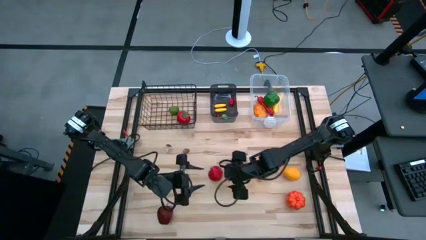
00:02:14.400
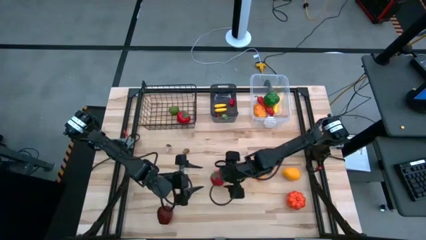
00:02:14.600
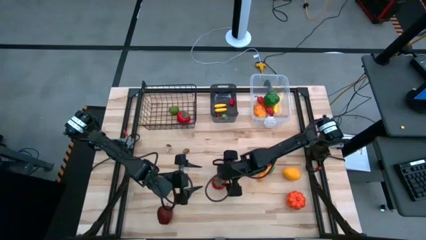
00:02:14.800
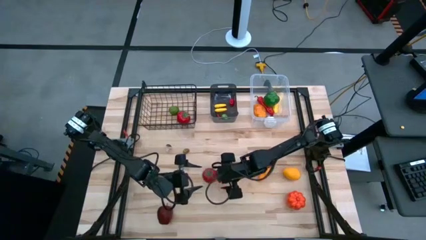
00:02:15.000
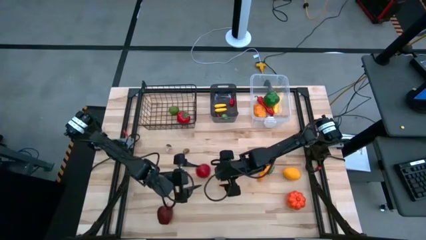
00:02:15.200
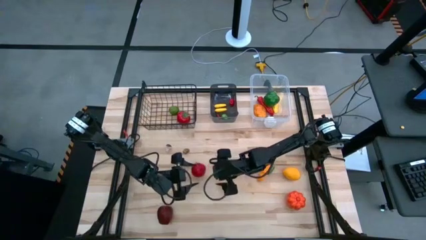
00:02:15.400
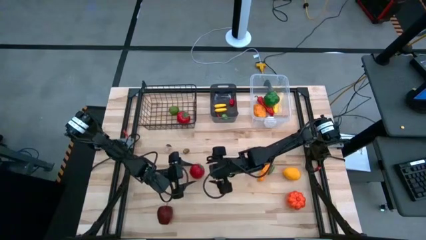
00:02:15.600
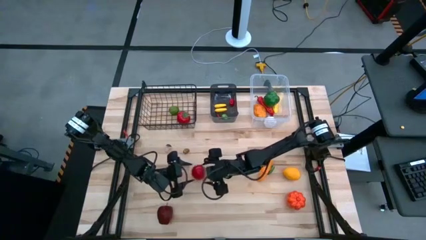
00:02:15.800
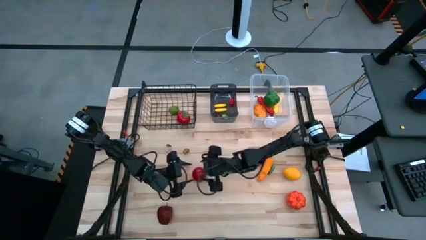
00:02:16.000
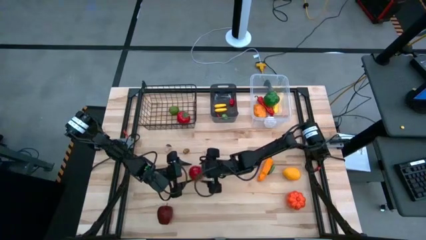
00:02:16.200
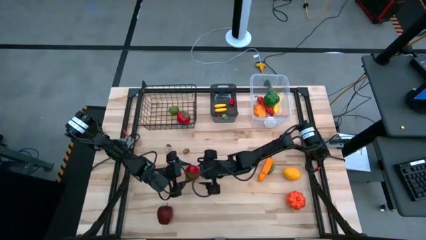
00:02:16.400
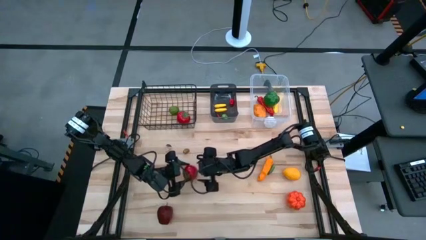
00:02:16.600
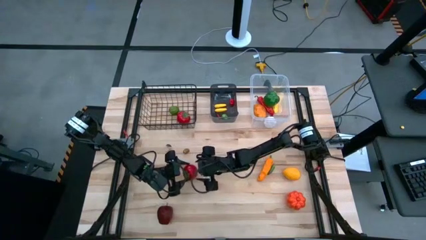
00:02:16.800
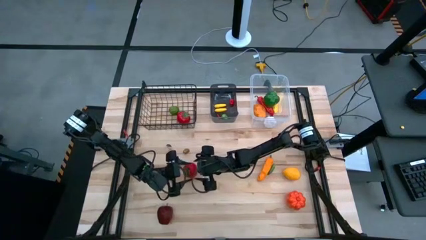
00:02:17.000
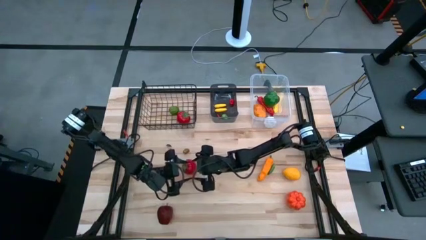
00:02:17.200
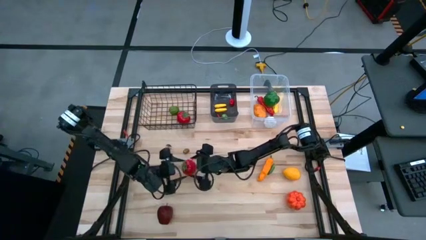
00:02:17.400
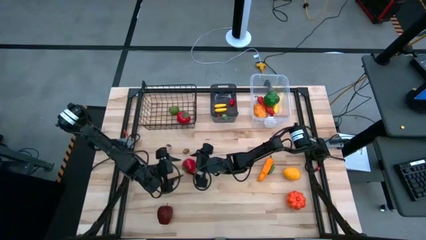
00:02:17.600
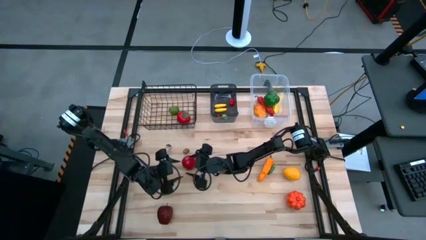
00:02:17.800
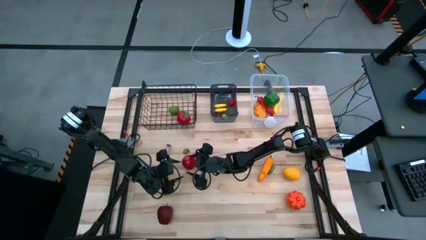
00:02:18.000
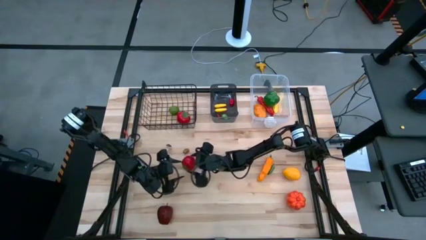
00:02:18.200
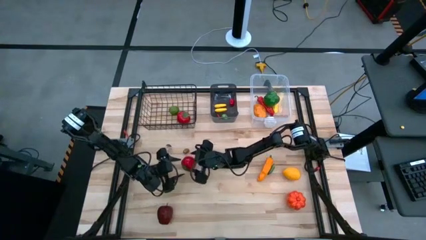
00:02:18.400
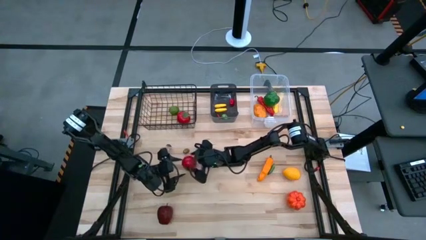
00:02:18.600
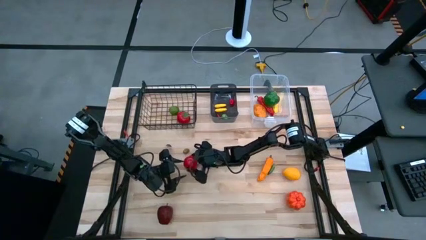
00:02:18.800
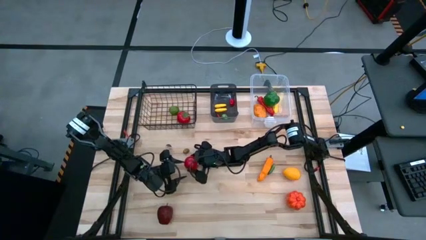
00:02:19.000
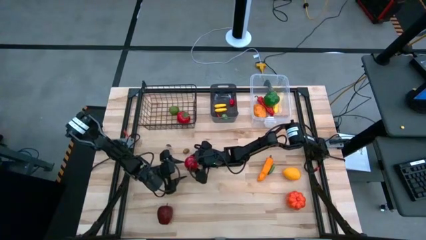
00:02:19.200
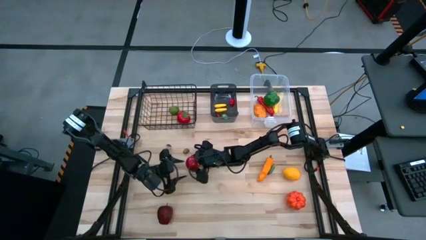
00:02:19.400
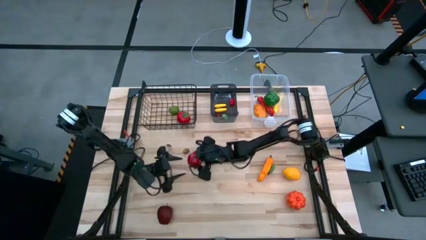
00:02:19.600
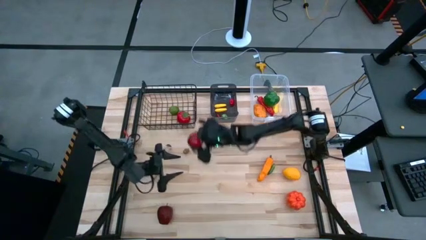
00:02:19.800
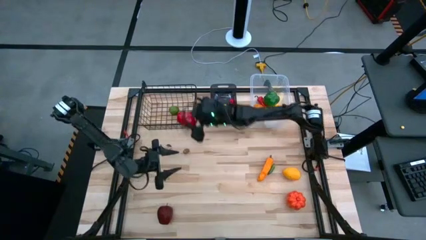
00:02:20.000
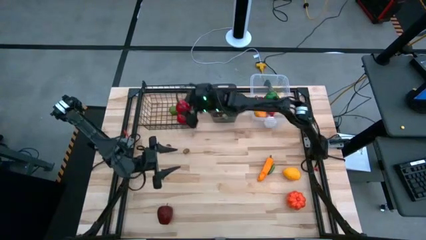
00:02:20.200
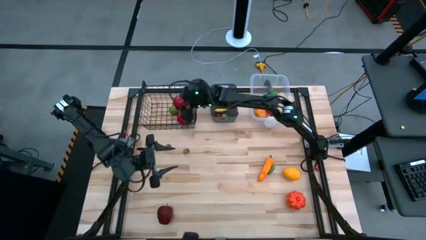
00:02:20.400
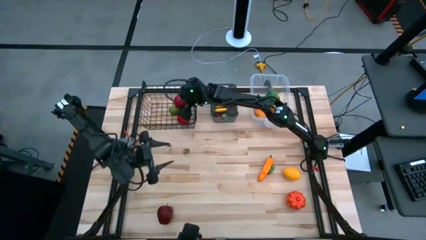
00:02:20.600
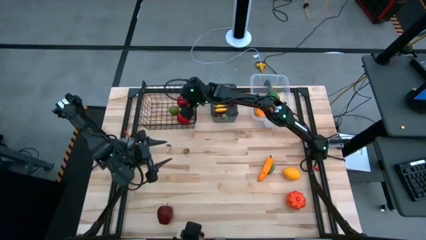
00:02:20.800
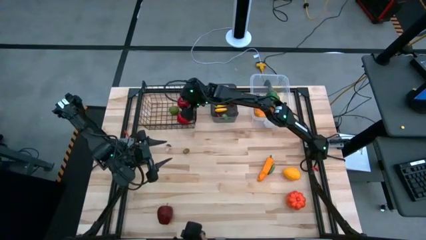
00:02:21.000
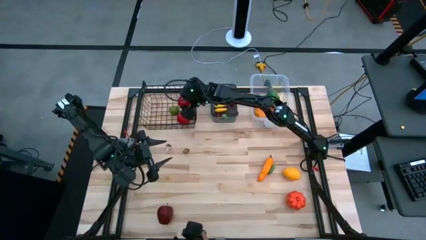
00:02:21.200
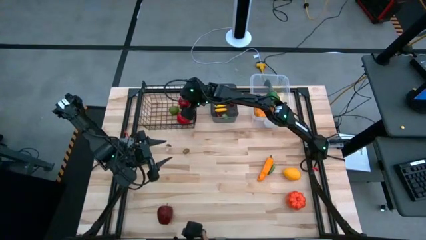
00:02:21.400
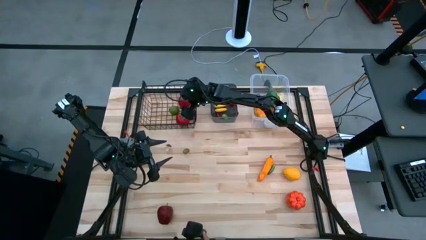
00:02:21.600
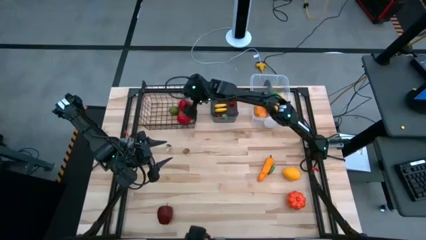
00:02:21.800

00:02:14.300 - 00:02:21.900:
Task: Sort produce into baskets
Put the tomato into the black basket

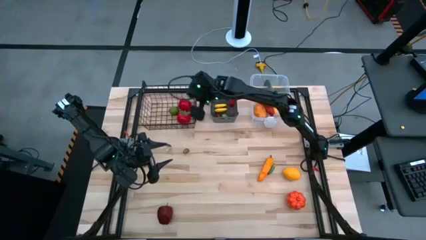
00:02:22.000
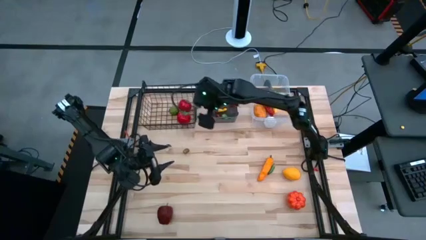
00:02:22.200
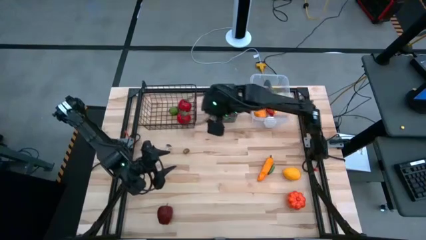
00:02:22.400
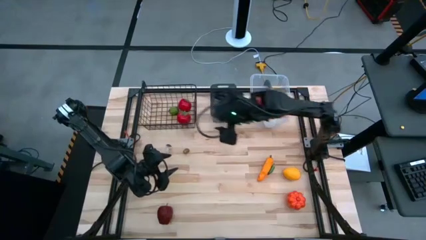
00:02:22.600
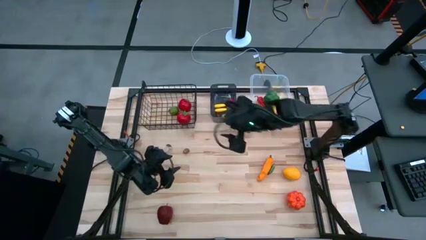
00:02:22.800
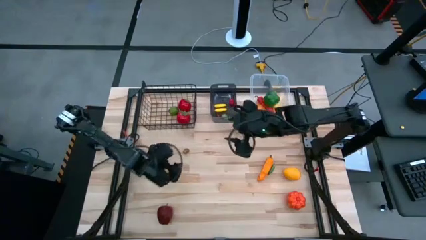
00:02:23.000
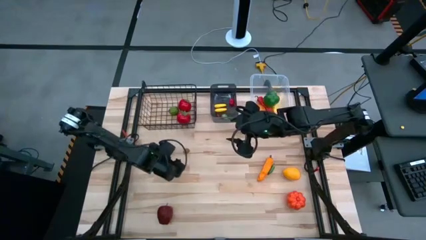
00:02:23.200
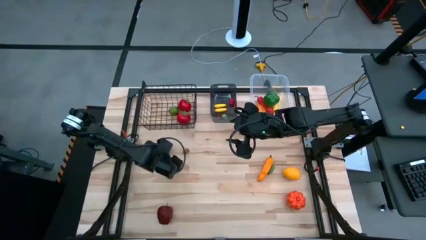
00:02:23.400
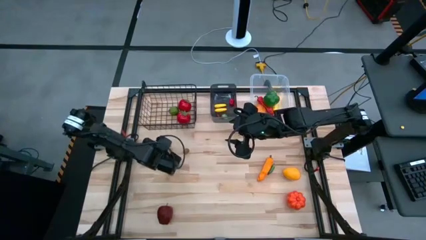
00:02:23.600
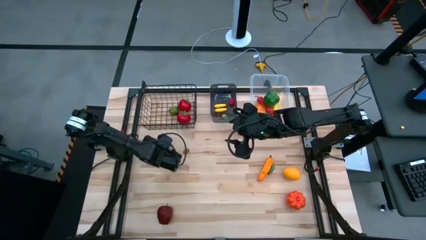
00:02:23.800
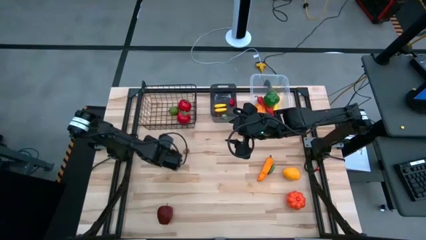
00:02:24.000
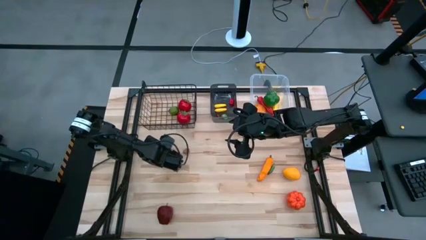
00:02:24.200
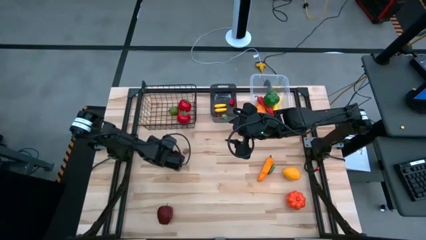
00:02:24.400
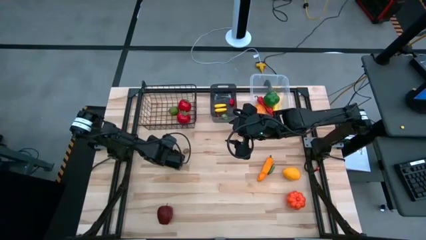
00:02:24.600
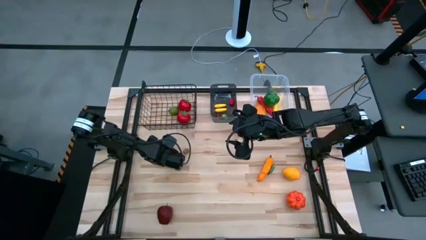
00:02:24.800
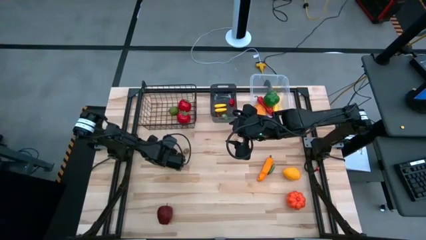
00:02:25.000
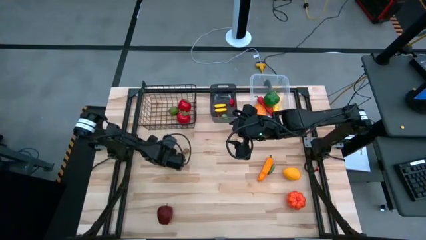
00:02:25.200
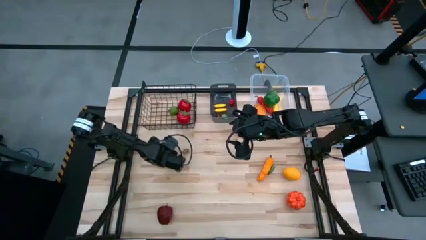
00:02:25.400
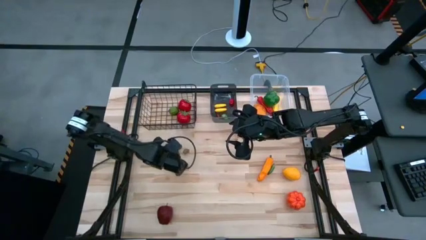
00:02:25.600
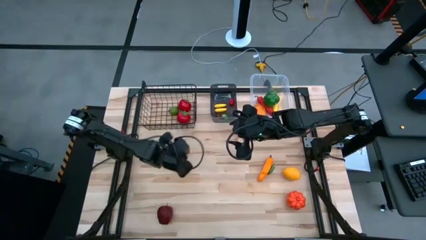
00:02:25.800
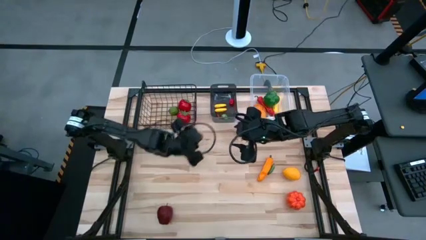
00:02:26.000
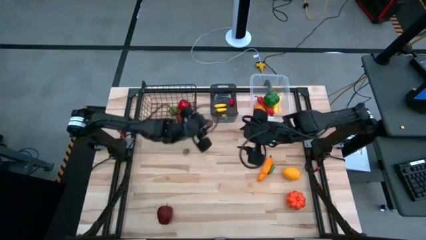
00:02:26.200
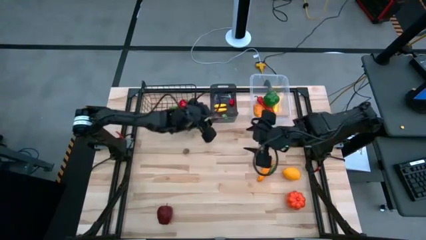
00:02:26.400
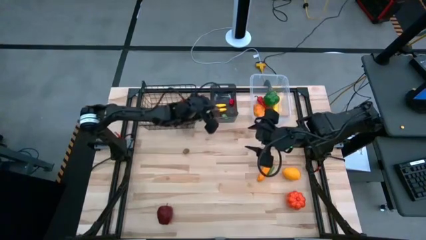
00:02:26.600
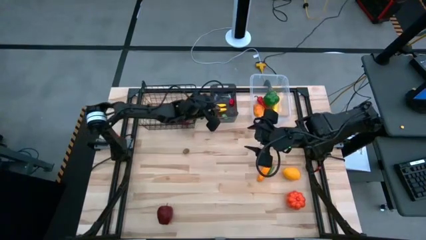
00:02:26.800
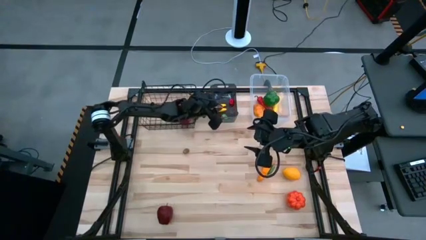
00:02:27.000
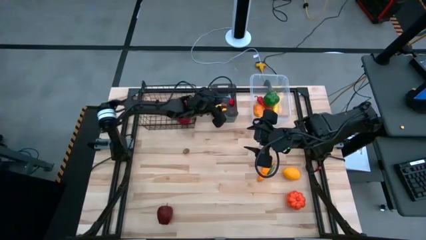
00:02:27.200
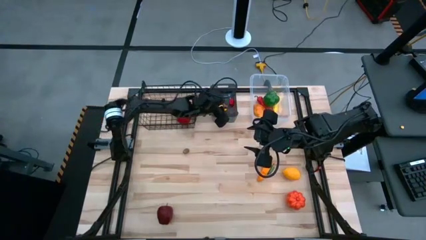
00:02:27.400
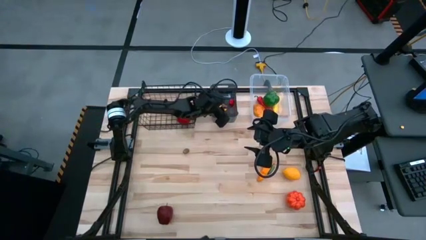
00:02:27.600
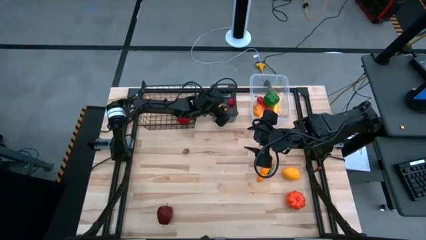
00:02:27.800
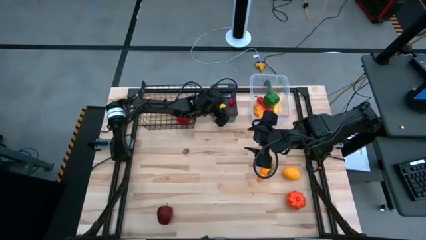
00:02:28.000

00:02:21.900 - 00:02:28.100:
Put the mushroom into the black bin

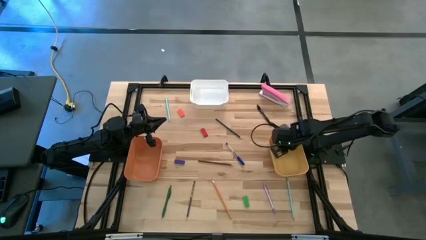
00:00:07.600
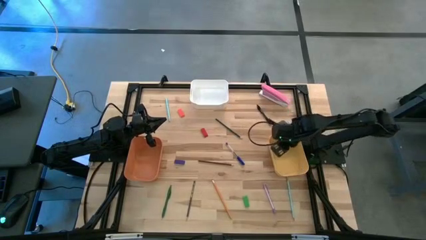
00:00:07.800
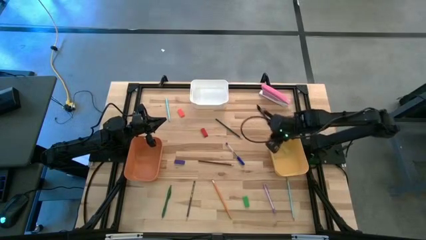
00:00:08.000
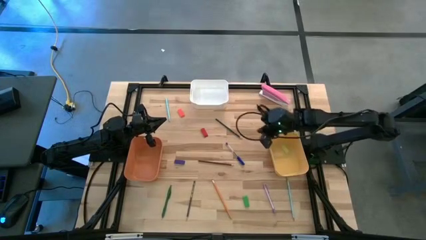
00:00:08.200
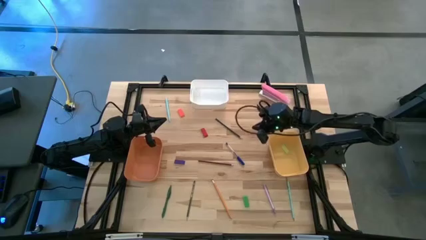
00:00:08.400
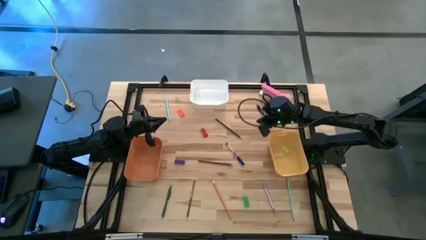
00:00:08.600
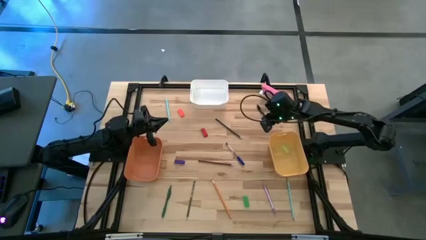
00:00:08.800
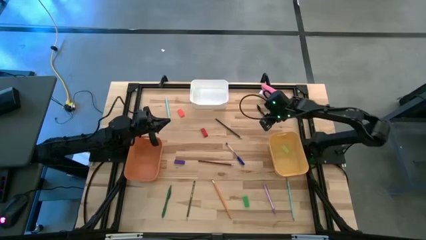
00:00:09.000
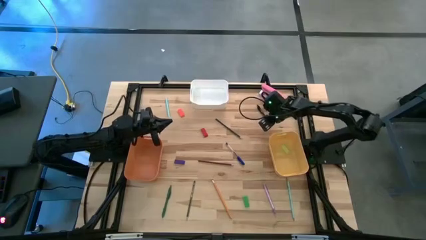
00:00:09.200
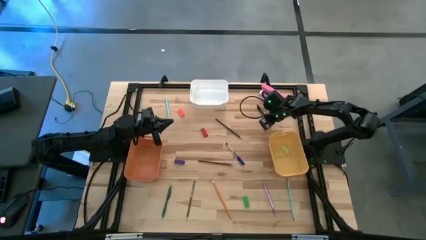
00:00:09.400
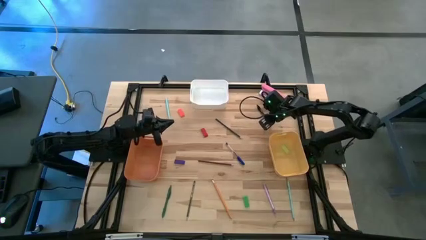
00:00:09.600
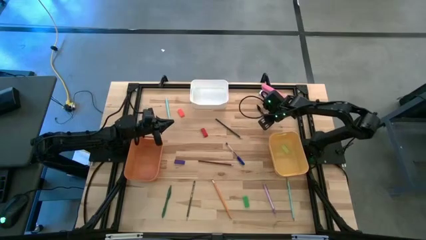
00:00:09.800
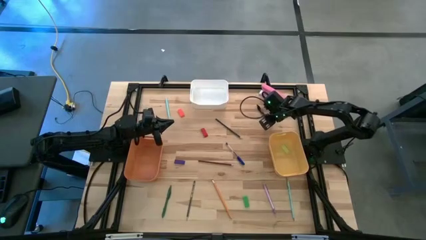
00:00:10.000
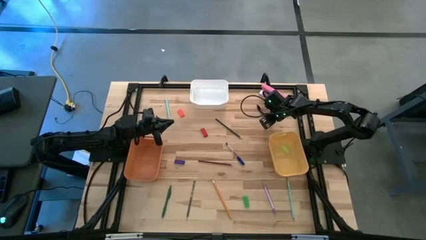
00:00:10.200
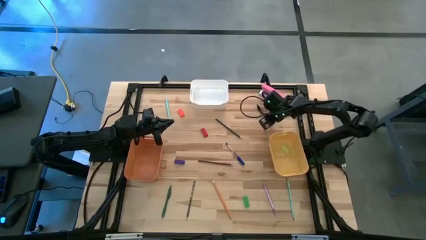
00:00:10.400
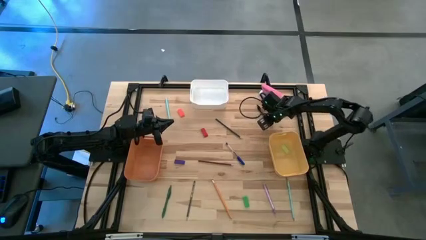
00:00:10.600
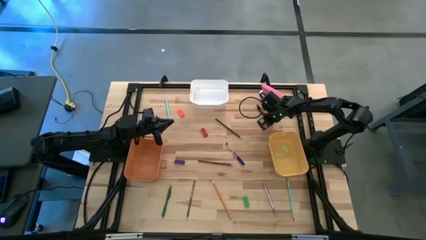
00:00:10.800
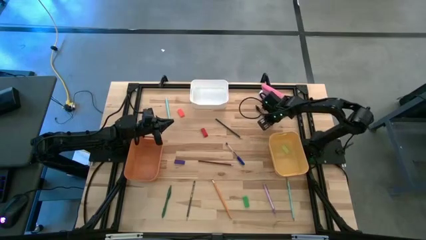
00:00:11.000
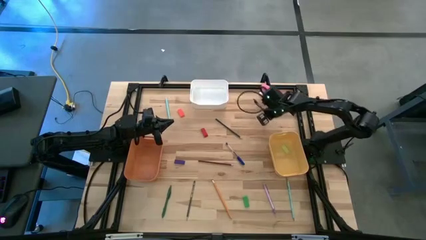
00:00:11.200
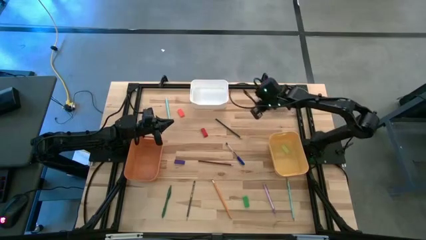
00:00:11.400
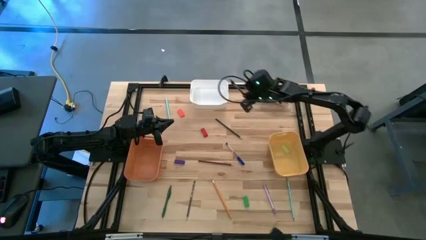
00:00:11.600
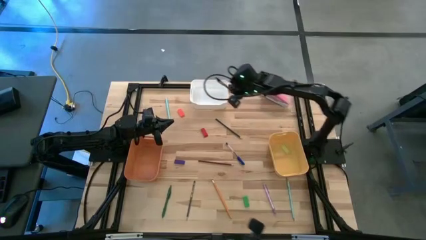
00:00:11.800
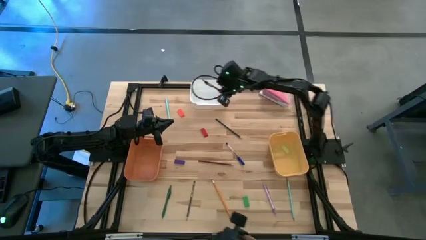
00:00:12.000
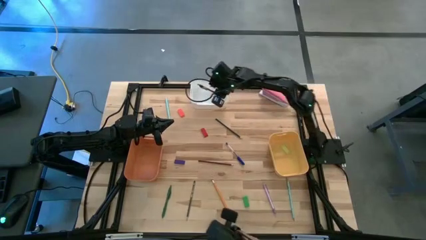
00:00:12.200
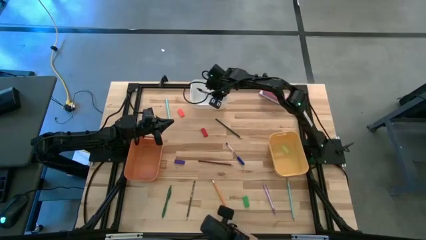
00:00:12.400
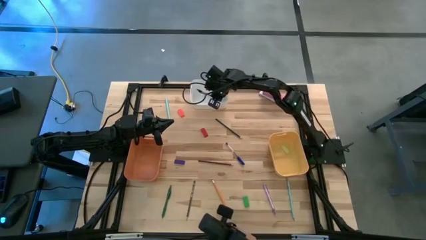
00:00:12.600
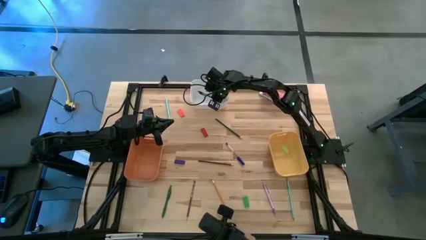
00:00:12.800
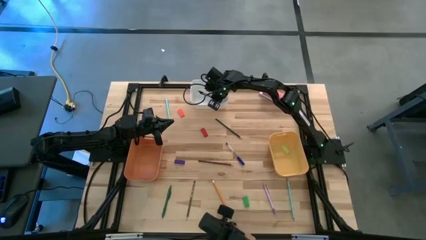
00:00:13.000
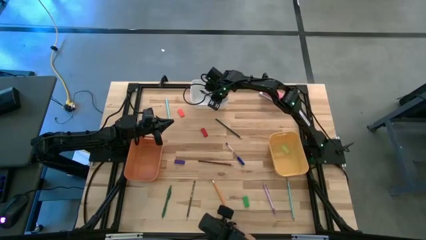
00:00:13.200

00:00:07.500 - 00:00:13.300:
Task: Sort crayons/erasers/pens/pencils in bins
Put the black pen into the white bin
